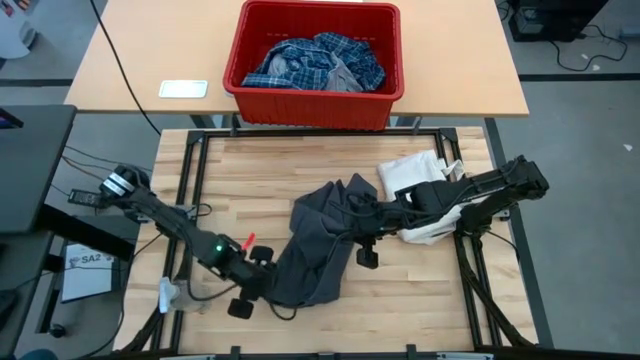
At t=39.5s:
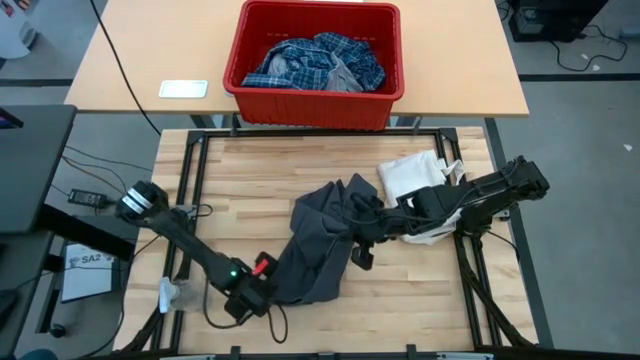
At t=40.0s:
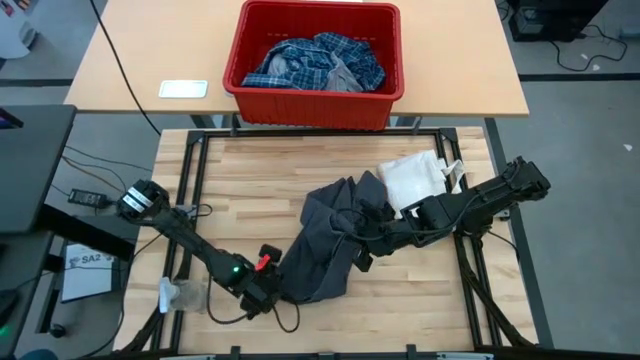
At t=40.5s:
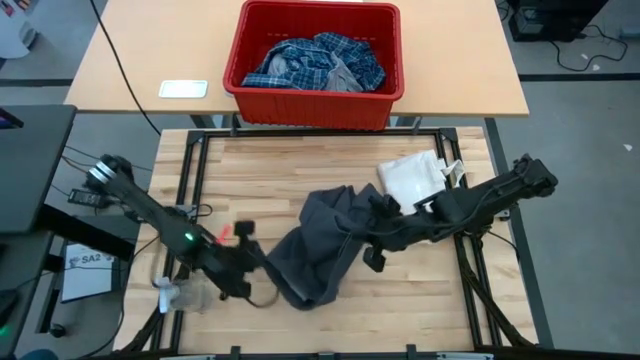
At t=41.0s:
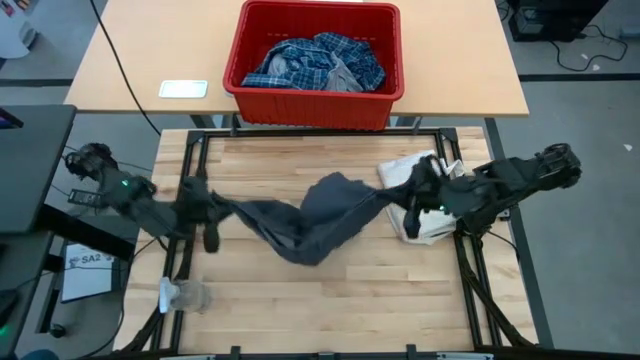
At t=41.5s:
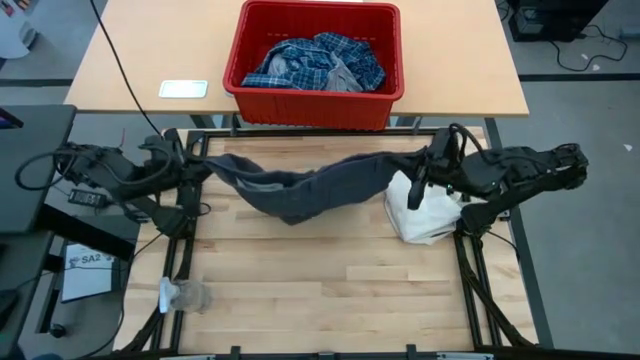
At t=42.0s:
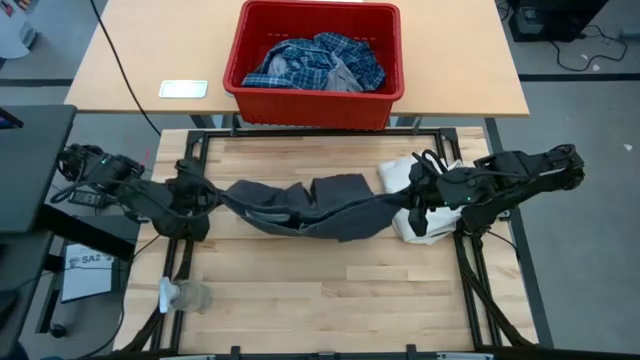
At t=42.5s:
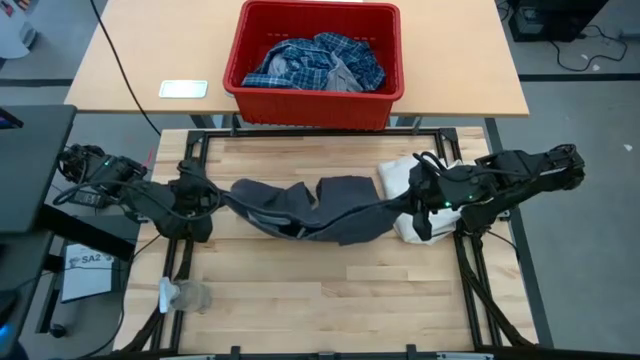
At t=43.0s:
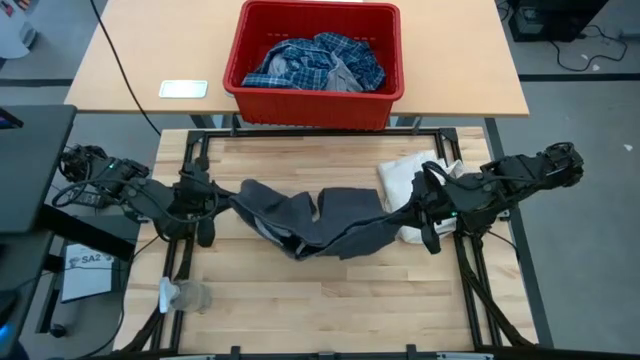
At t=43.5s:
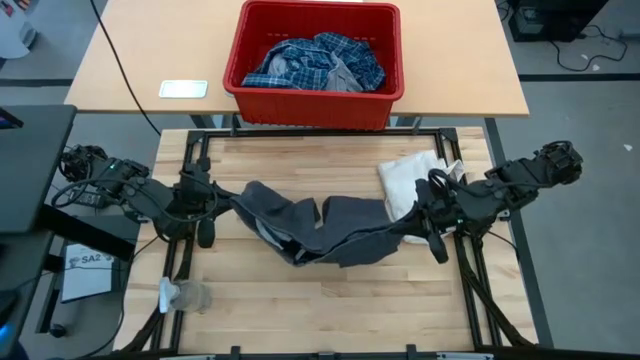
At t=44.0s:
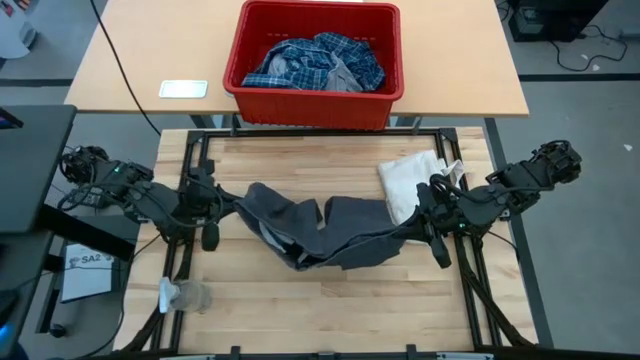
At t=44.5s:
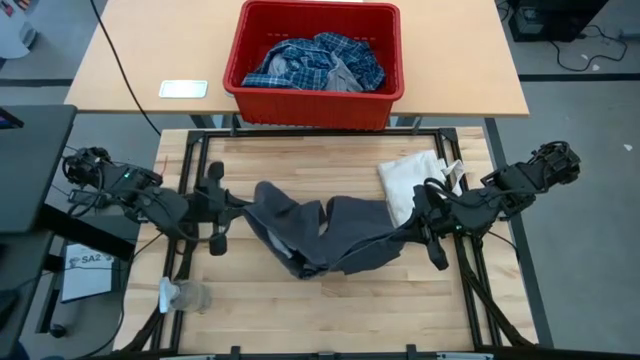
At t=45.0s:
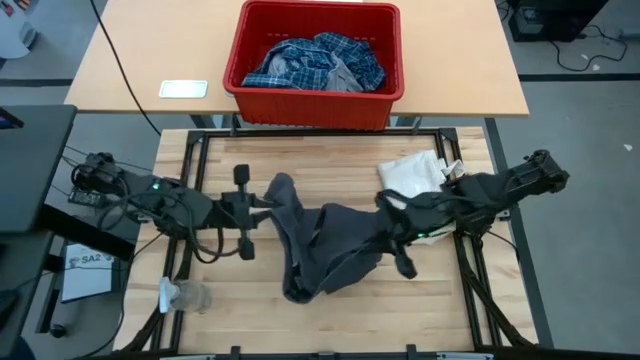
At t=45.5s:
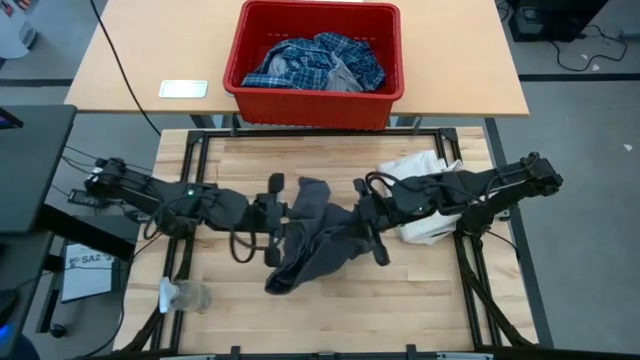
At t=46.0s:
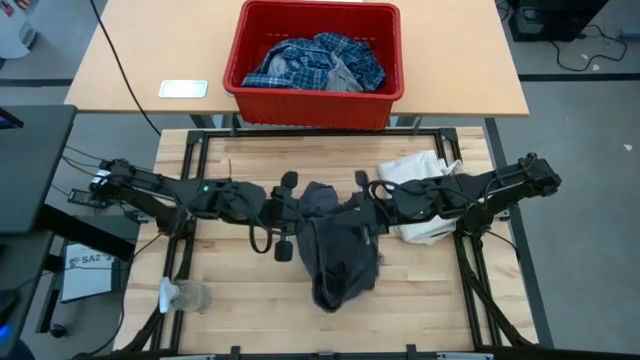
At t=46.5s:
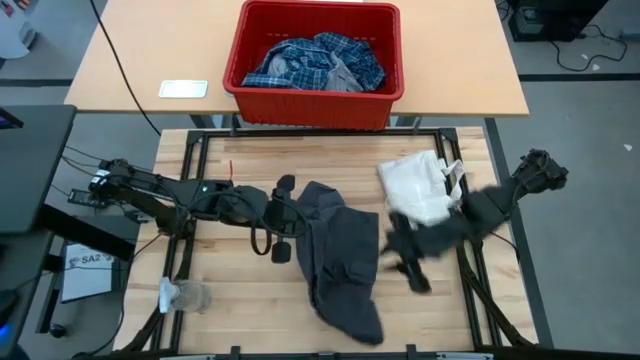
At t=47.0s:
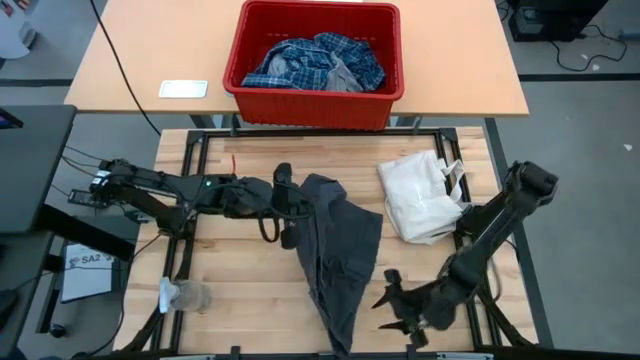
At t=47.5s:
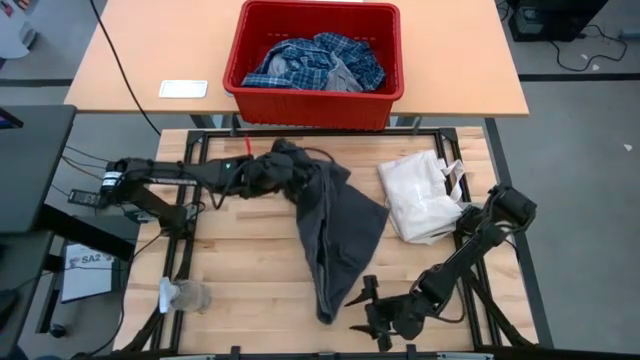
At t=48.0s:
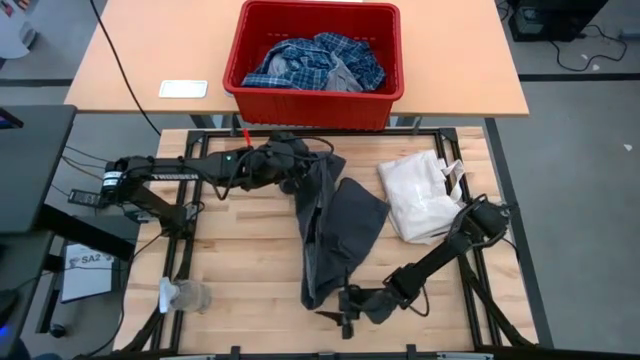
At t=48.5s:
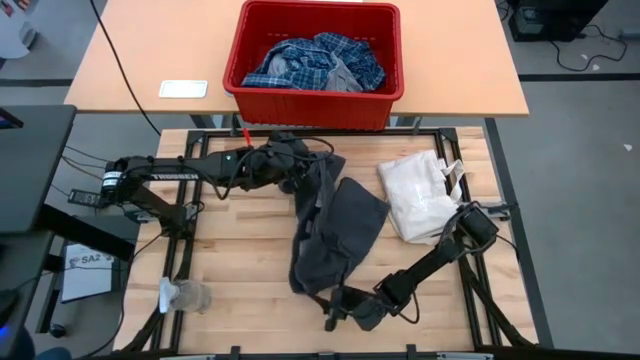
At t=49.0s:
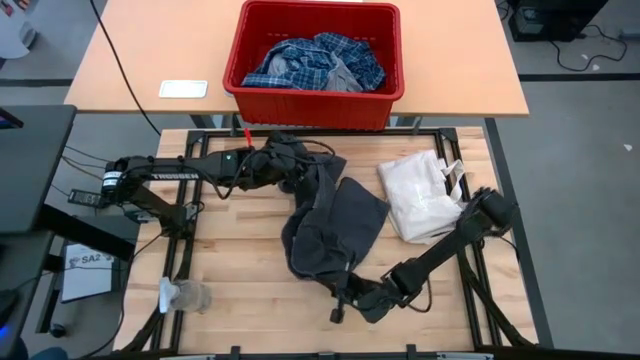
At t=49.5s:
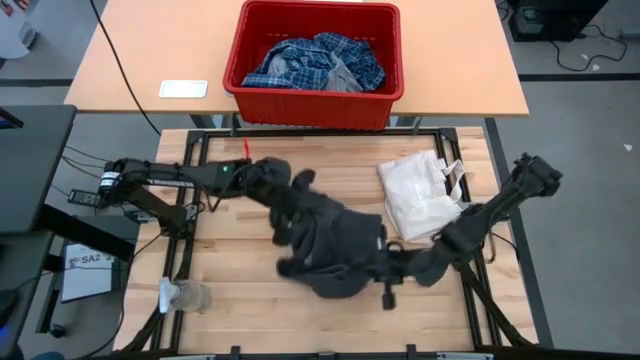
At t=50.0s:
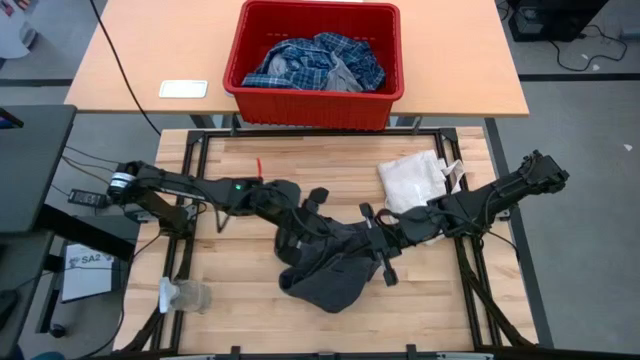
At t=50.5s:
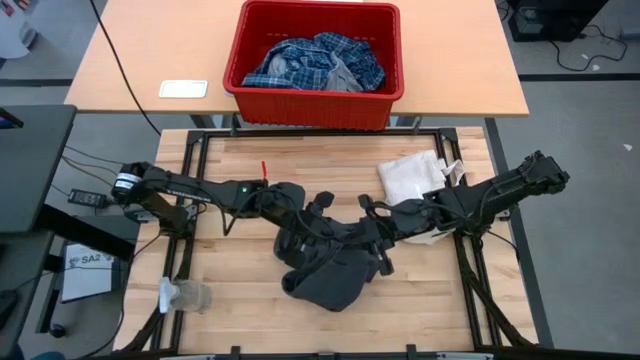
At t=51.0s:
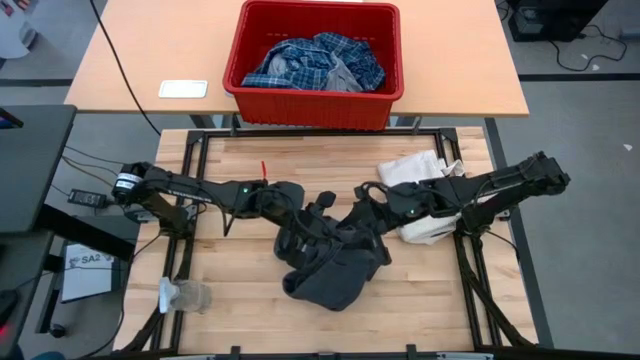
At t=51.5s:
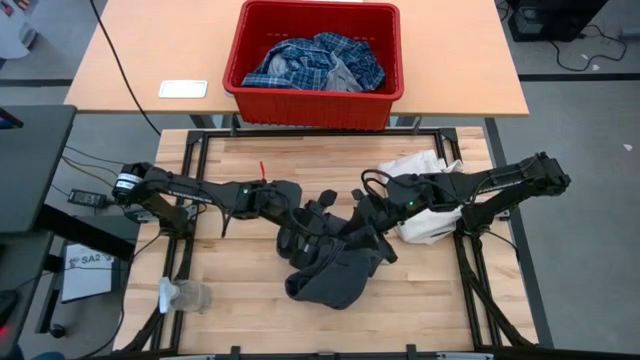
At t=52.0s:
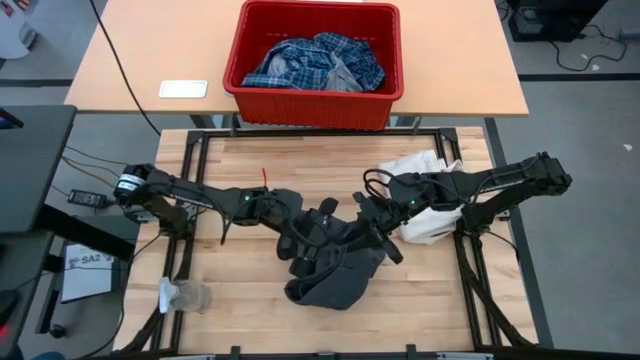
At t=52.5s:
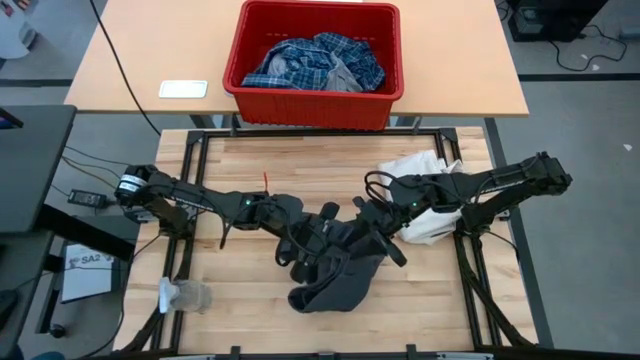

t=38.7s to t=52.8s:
Task: Fold Laundry from Bin
Fold the black shorts

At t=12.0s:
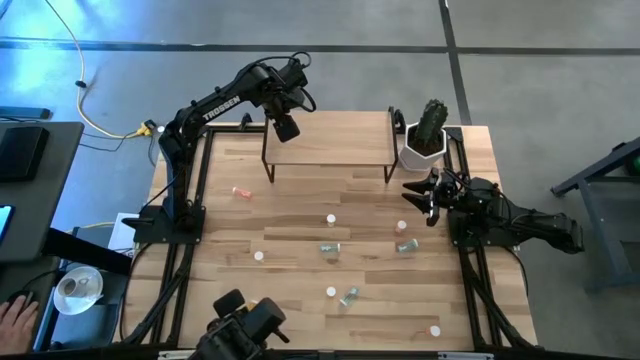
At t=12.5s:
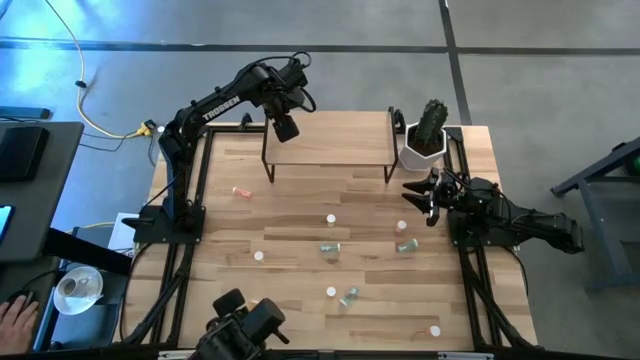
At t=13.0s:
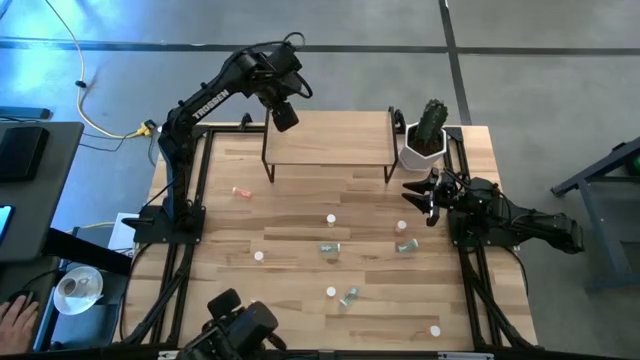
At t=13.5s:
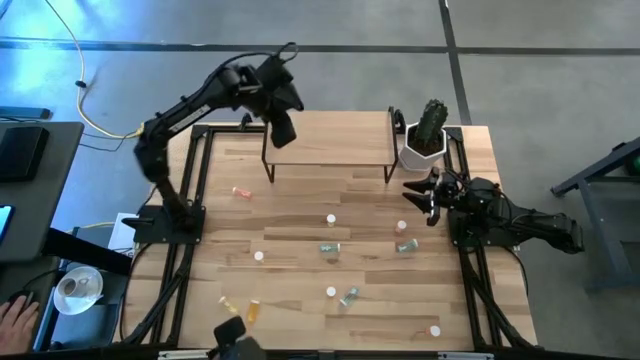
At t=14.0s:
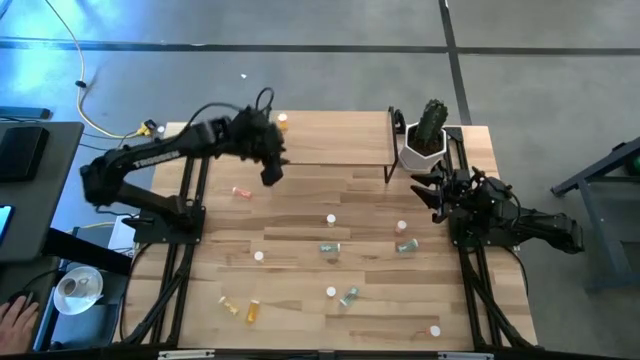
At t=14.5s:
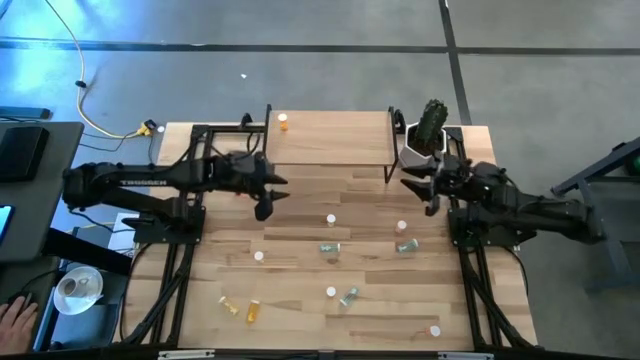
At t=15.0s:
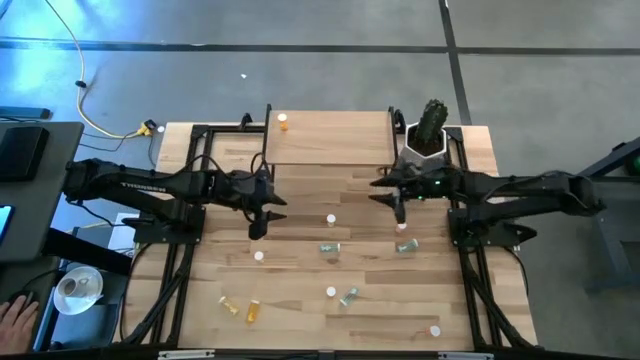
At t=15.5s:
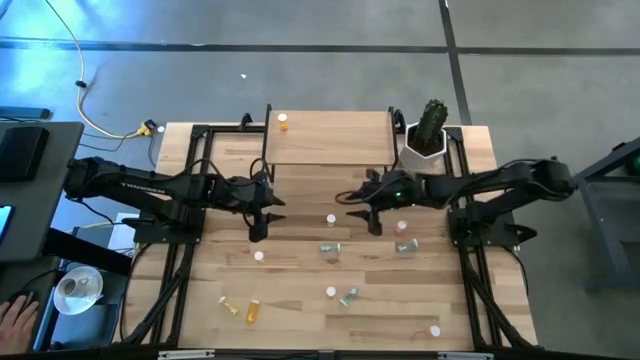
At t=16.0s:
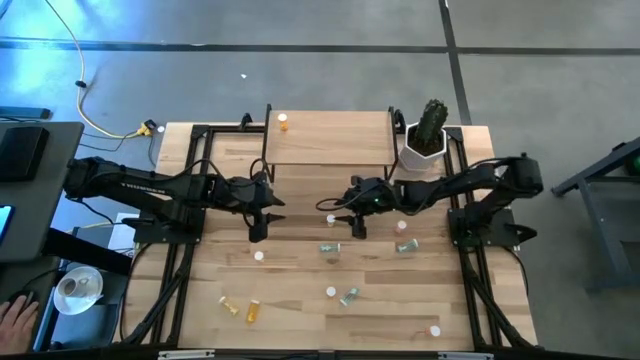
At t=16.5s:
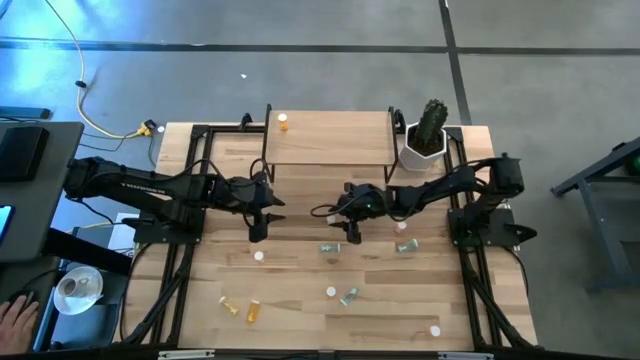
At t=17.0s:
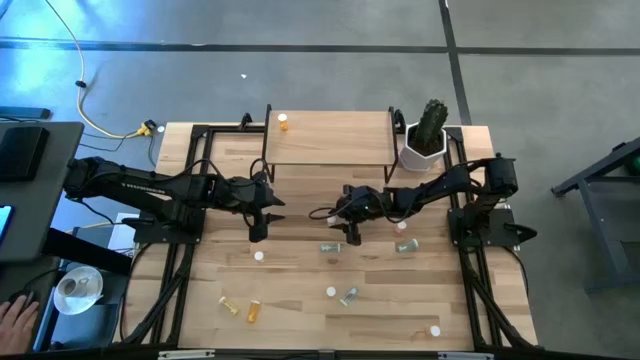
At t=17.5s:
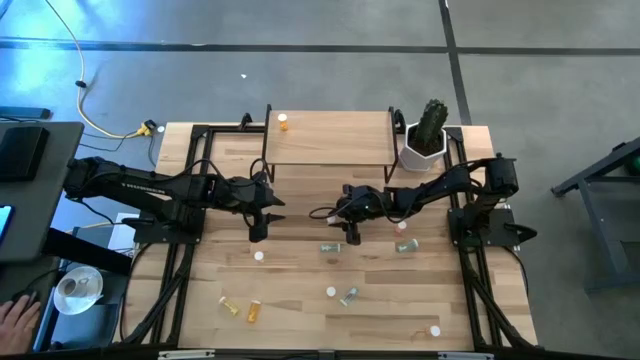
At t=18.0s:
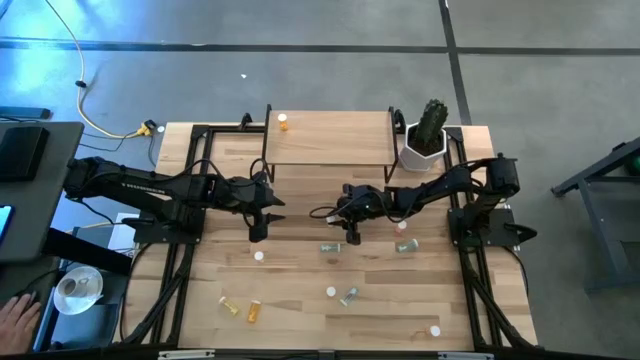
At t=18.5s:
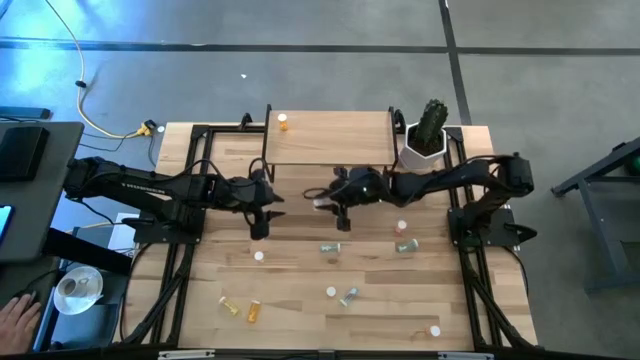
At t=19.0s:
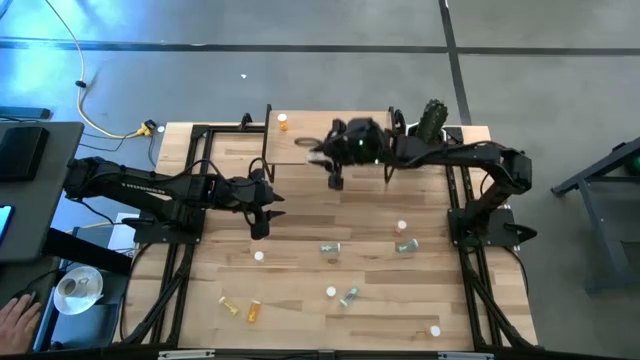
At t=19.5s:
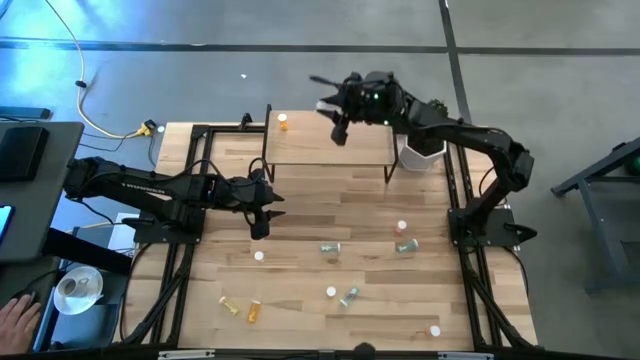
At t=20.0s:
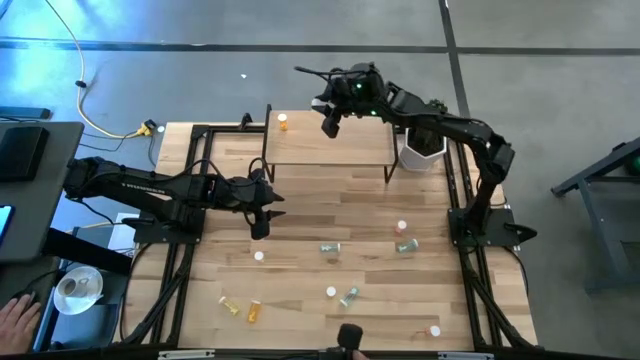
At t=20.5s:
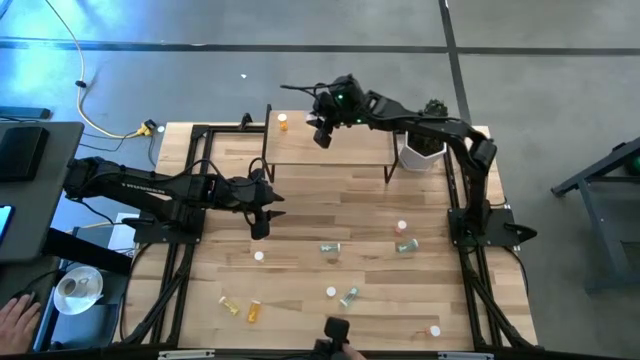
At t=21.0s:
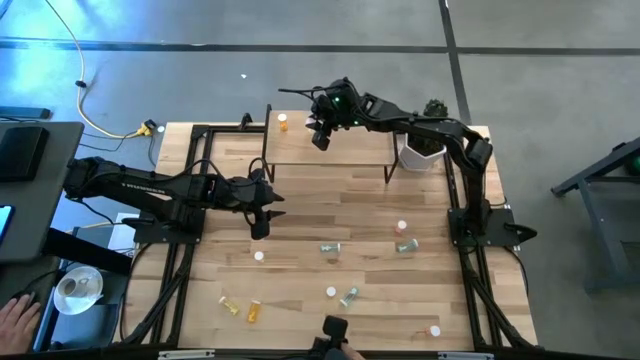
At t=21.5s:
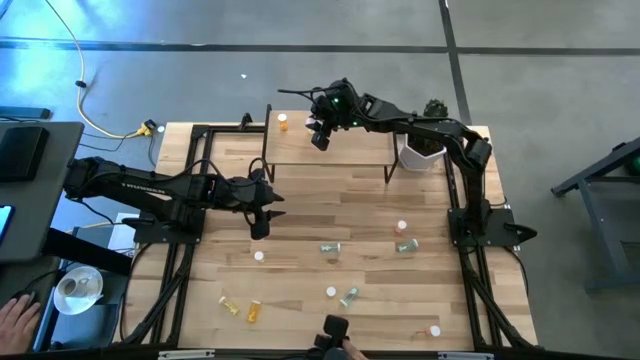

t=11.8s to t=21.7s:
Task: Pick and place medicine bottles onto shelf by color
Put the top yellow pill bottle on the shelf
